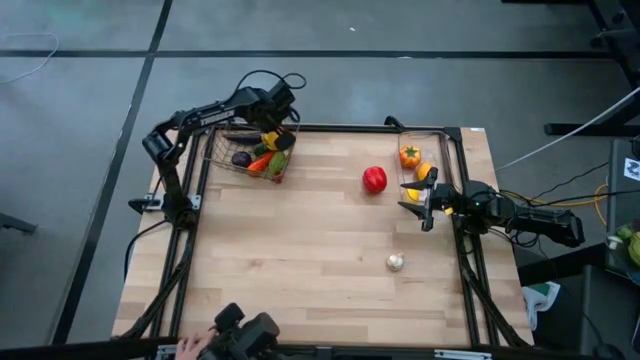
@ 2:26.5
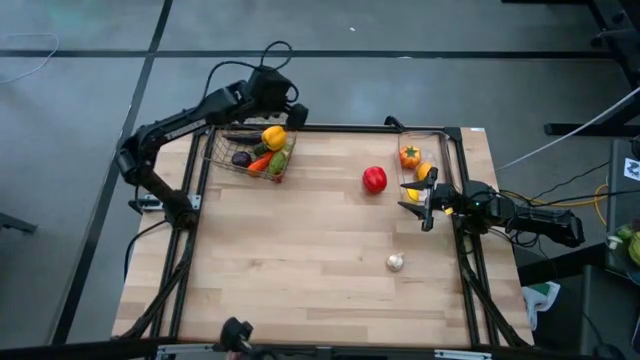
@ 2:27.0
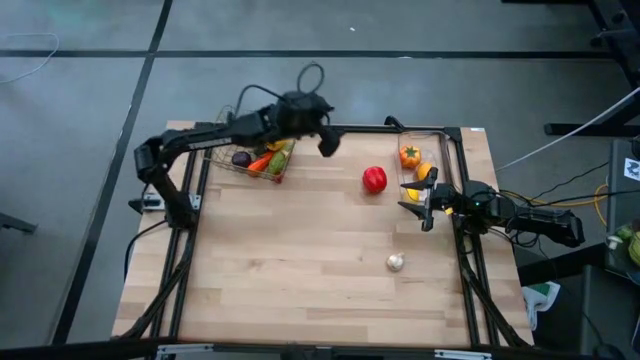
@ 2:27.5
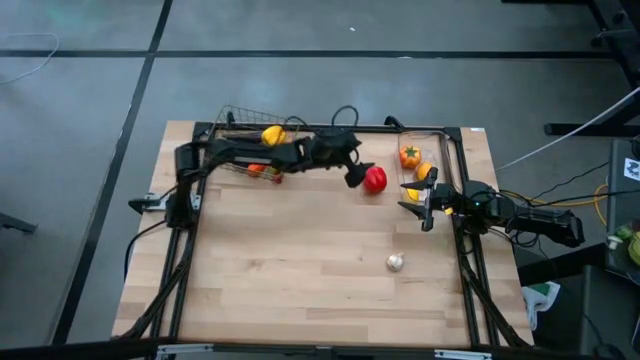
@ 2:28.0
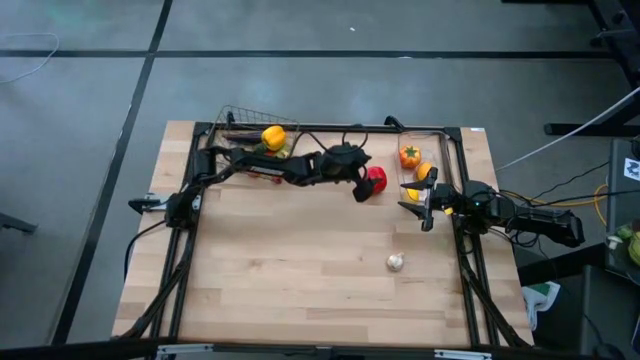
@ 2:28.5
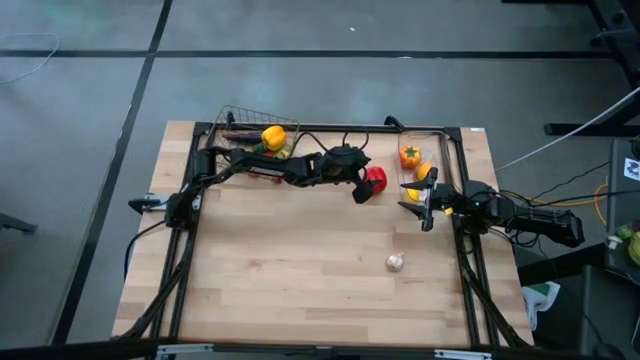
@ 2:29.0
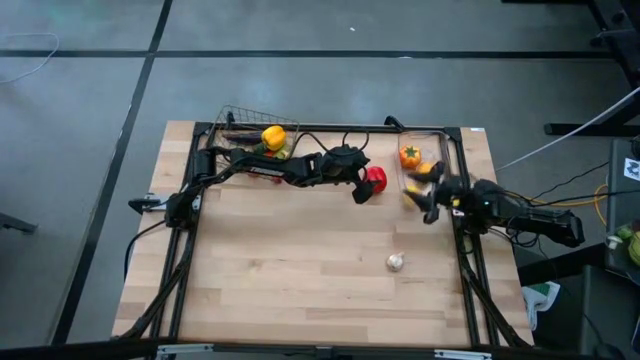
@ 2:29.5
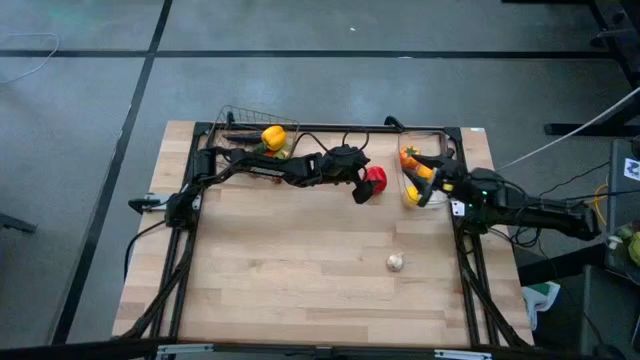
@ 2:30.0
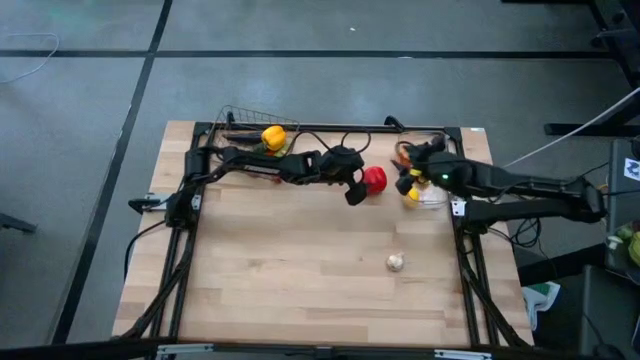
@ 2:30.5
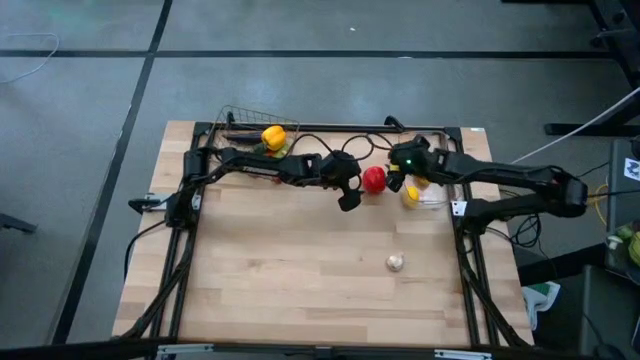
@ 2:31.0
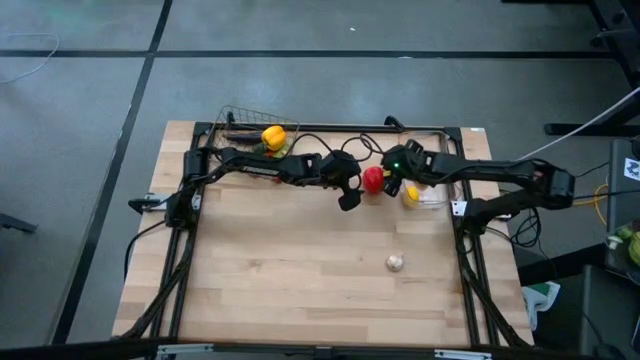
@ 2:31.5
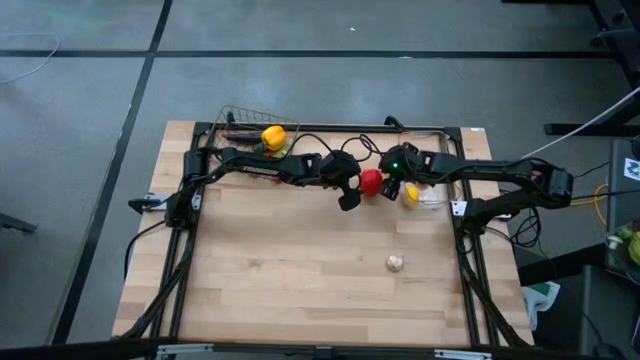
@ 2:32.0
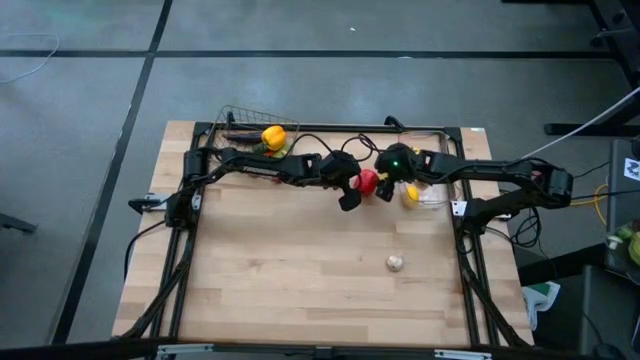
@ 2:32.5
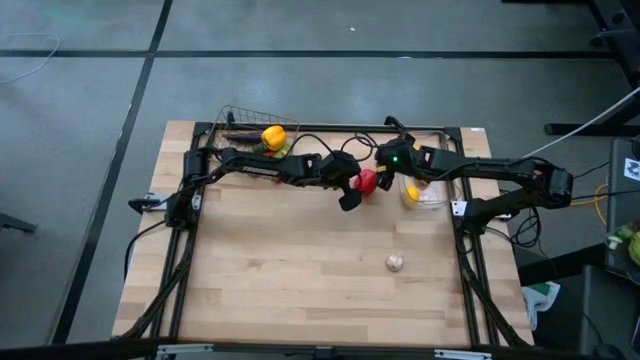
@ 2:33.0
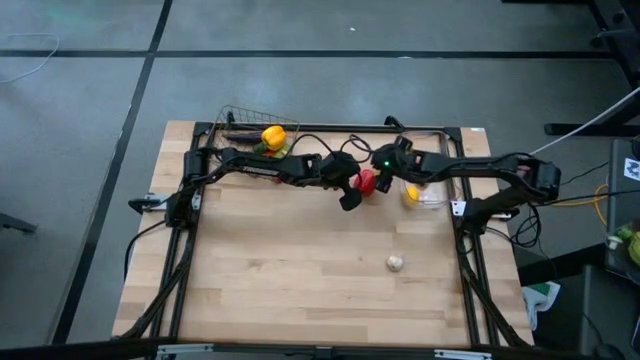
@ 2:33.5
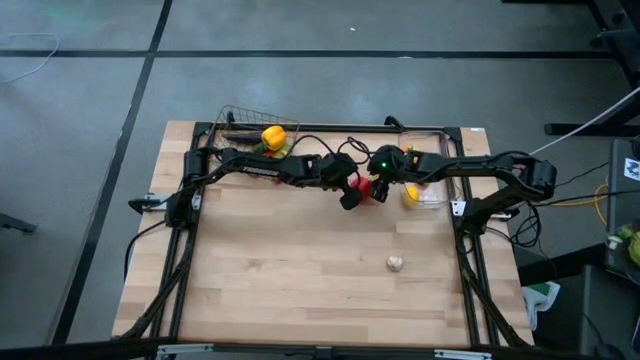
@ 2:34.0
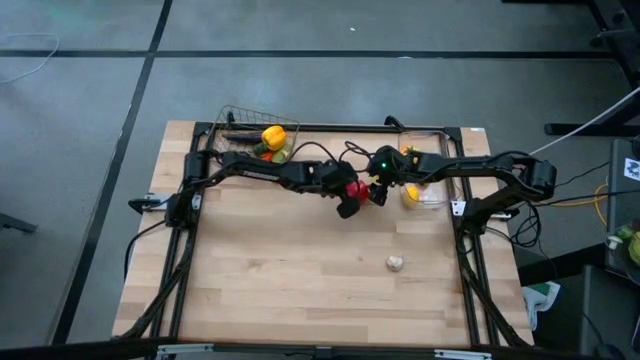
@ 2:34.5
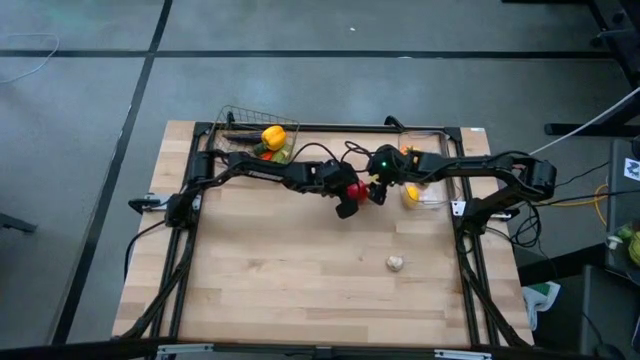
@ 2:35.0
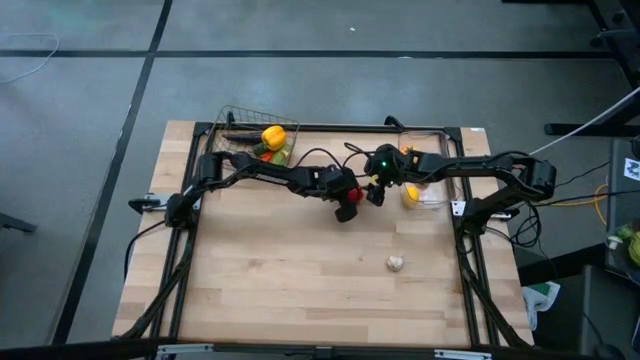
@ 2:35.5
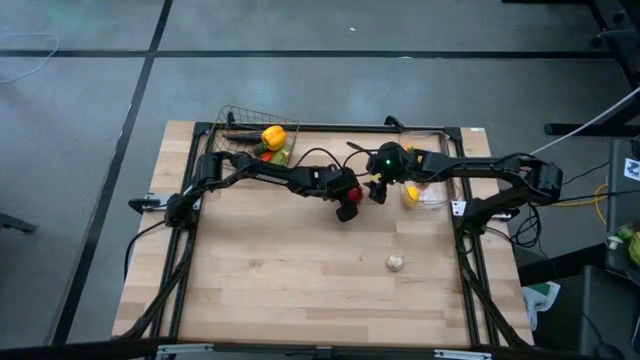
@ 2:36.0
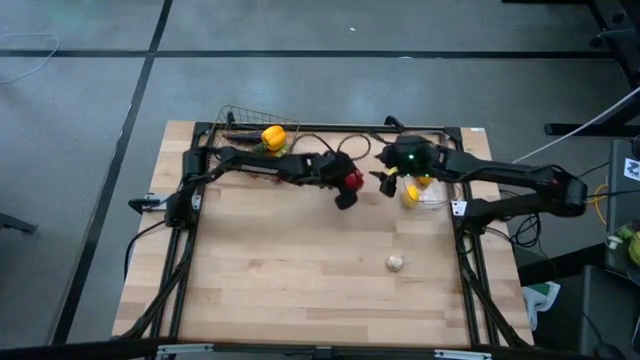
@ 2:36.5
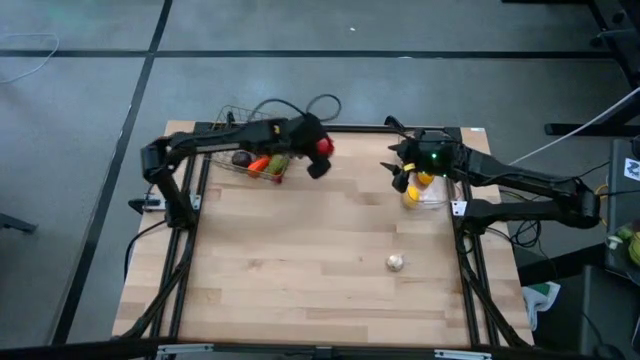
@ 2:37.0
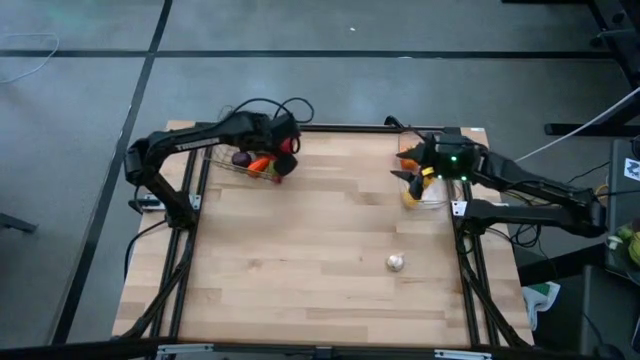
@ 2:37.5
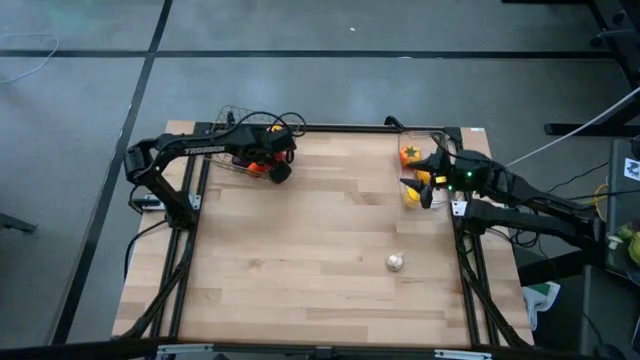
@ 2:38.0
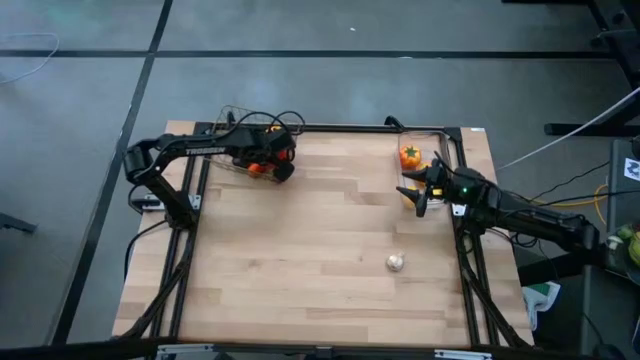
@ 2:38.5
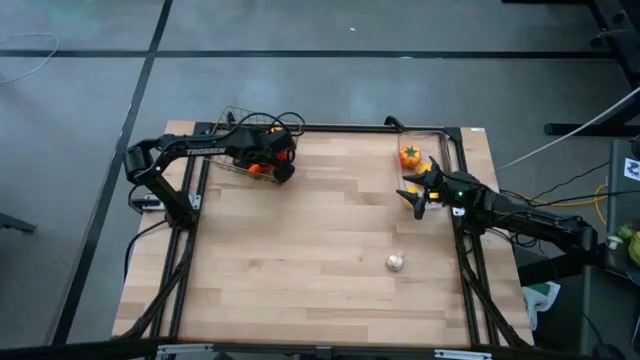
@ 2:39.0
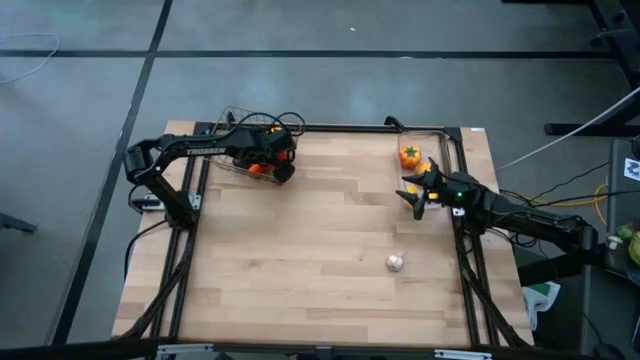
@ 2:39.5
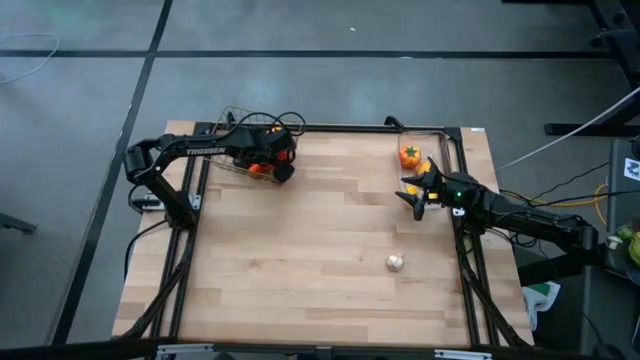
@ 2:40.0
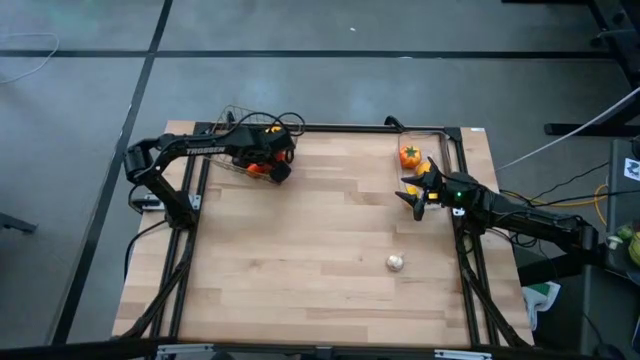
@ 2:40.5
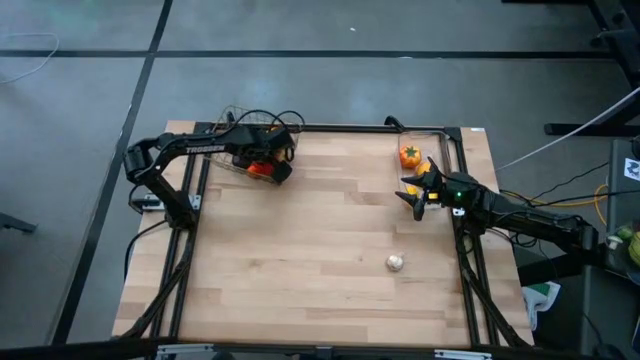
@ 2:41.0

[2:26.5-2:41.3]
Task: Sort produce into baskets
Put the red bell pepper into the silver wire basket

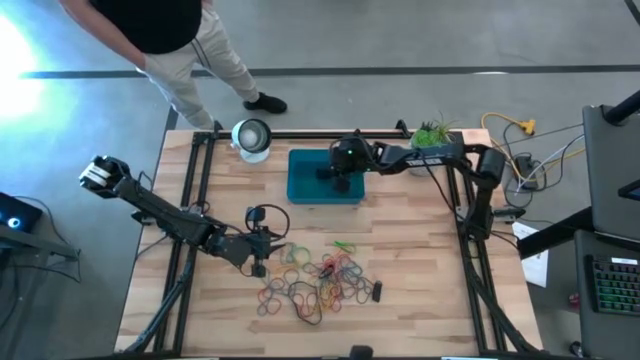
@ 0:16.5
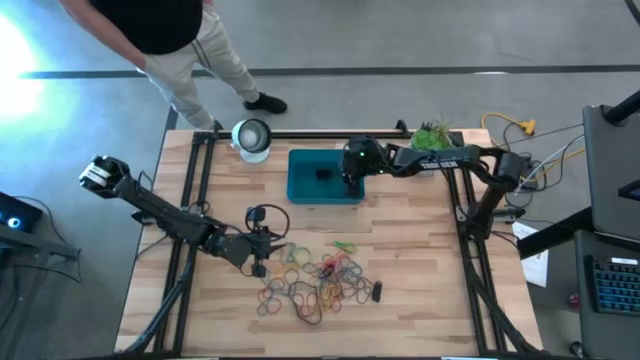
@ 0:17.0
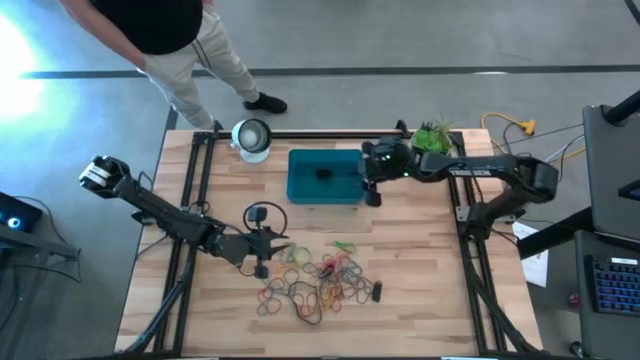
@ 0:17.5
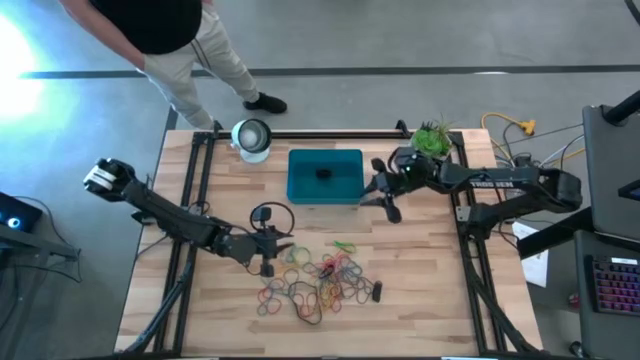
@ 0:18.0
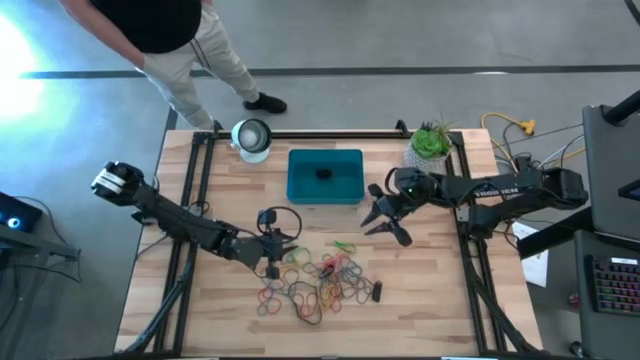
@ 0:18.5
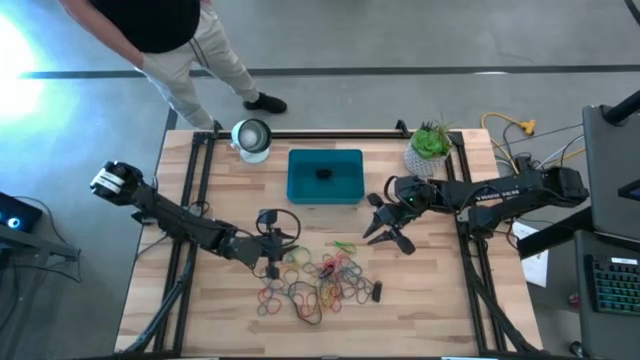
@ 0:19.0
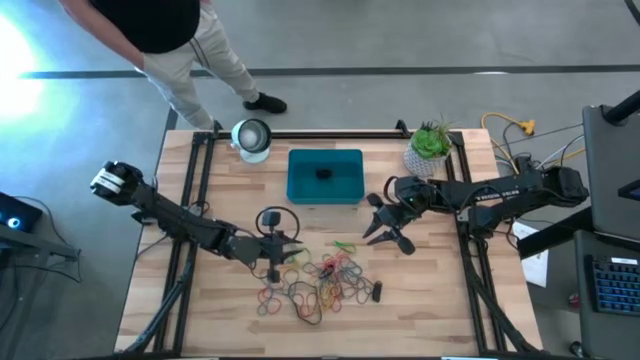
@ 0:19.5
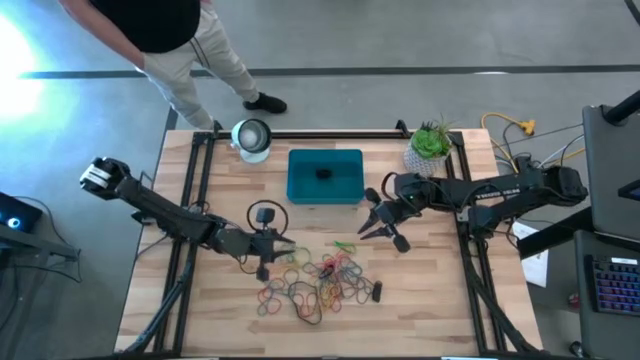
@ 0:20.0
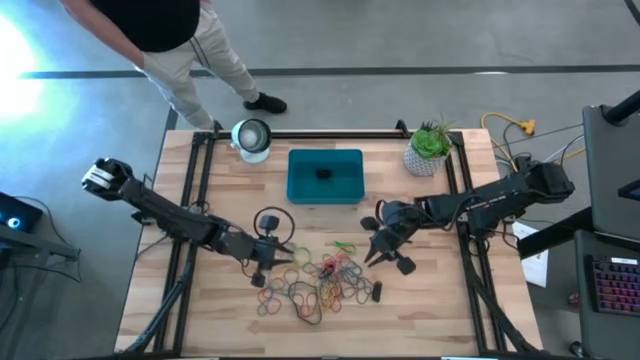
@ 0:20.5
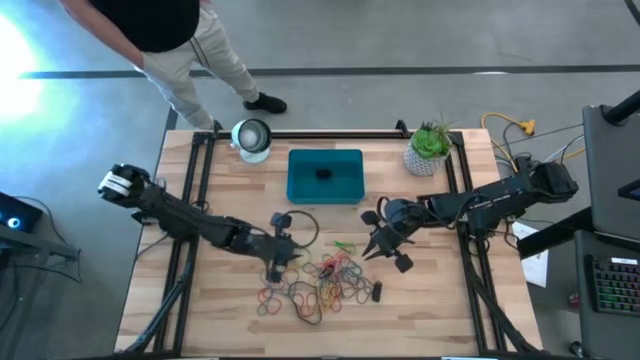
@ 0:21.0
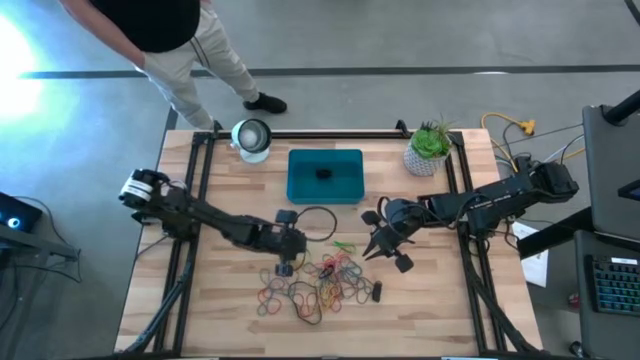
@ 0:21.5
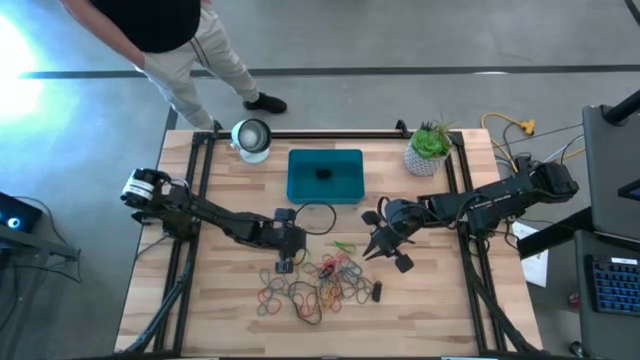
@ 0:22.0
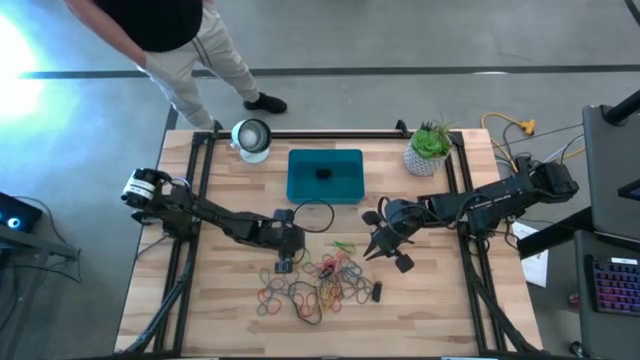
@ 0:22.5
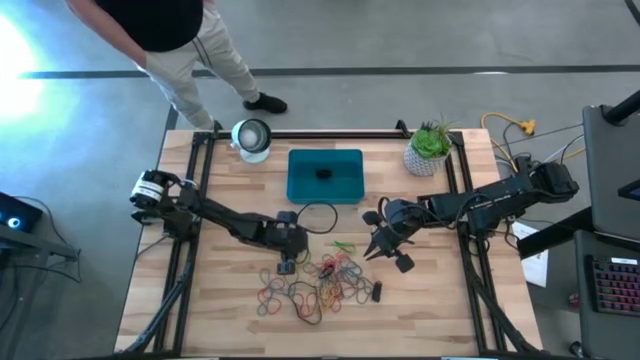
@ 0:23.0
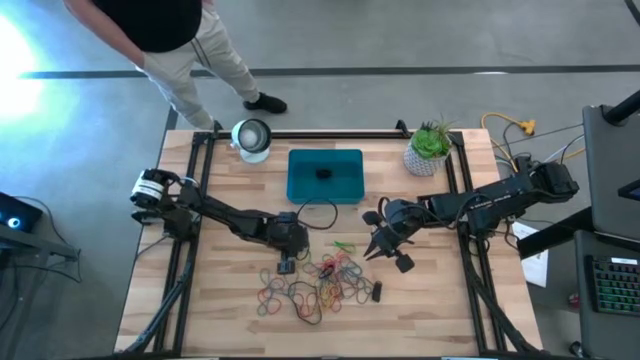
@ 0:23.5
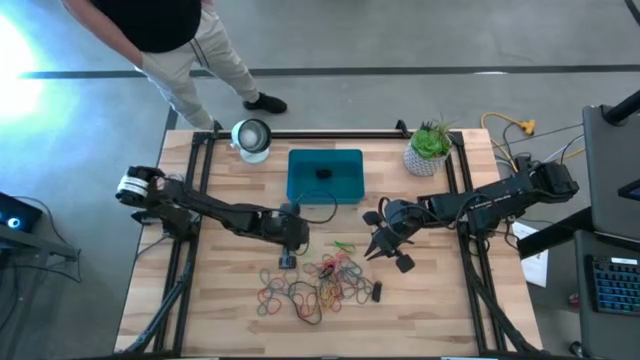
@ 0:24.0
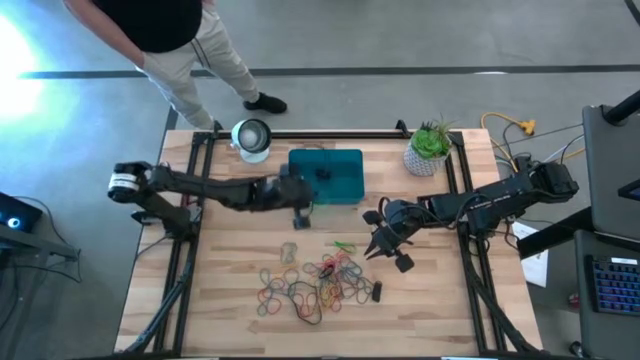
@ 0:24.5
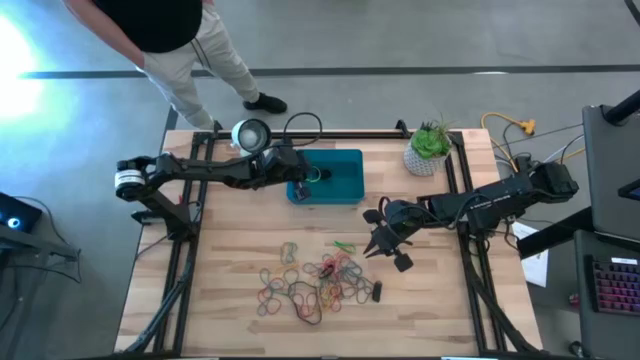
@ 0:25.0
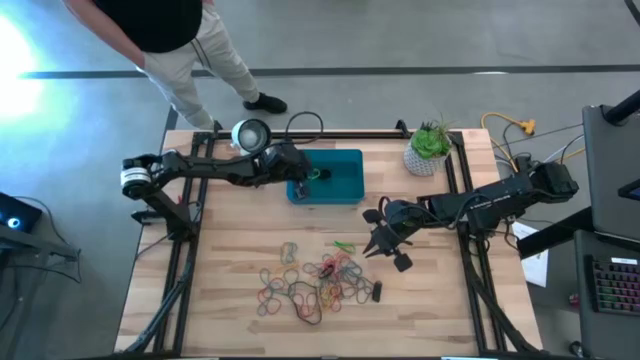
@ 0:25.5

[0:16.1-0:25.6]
Task: Pick and place rubber bands into bin
Put the green rubber band into the bin
